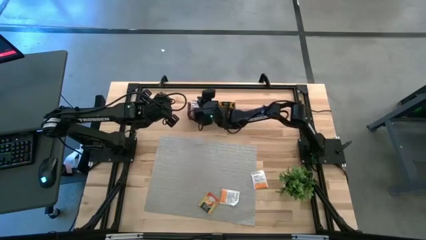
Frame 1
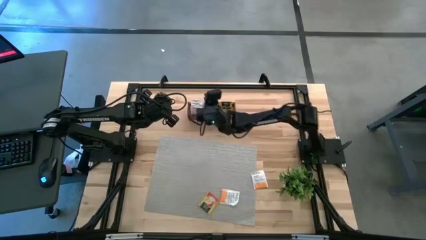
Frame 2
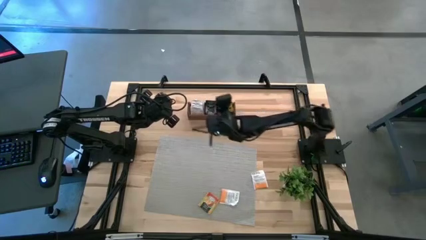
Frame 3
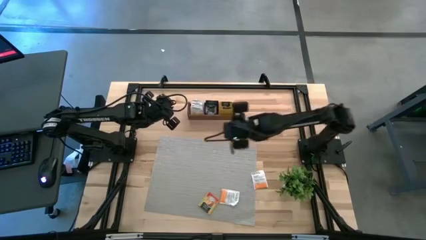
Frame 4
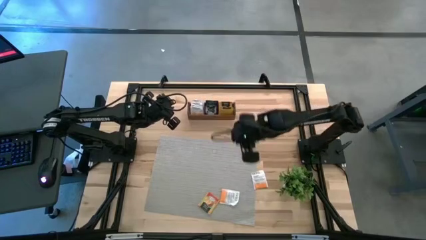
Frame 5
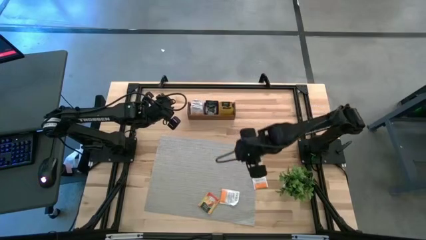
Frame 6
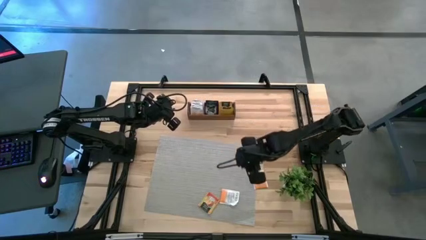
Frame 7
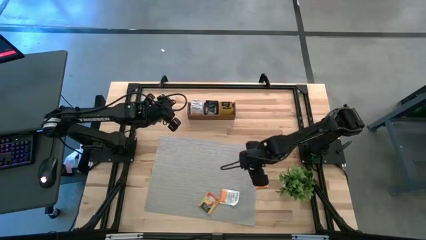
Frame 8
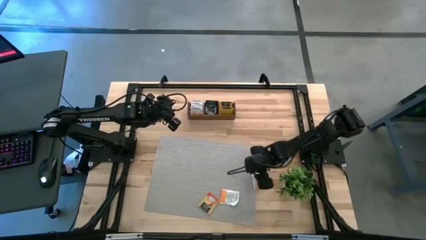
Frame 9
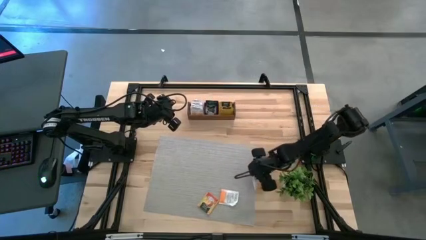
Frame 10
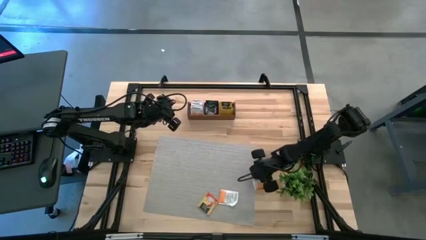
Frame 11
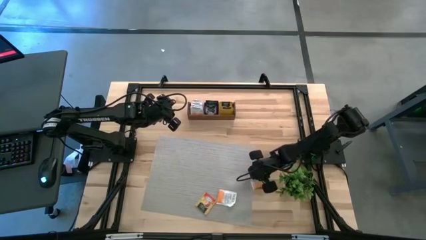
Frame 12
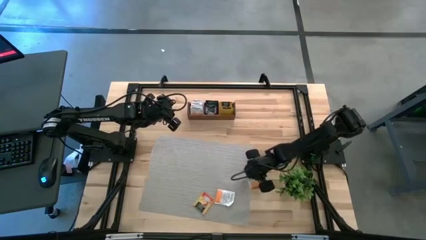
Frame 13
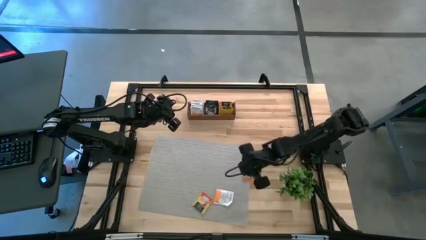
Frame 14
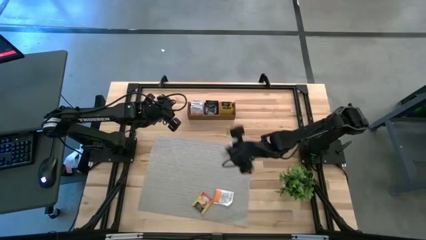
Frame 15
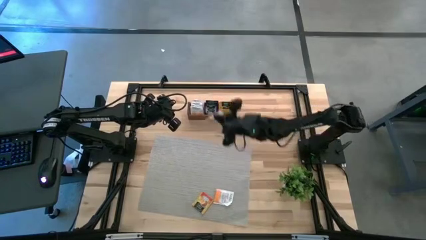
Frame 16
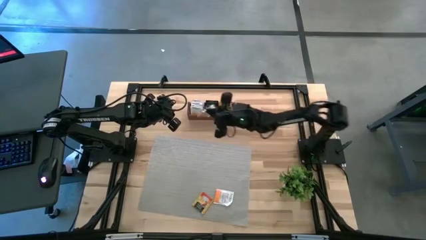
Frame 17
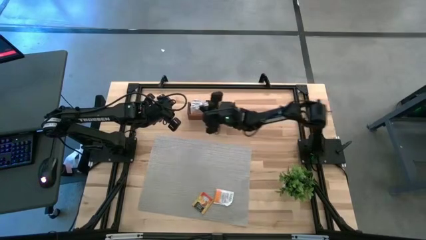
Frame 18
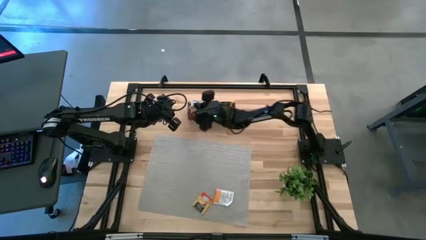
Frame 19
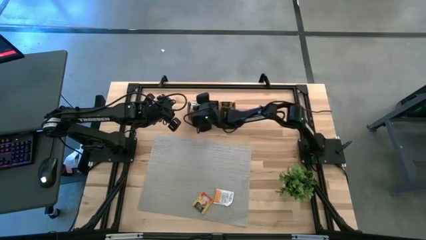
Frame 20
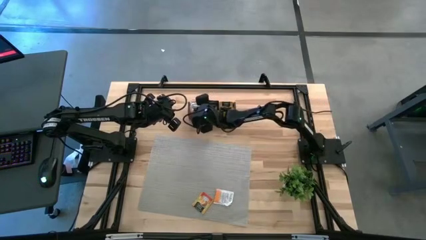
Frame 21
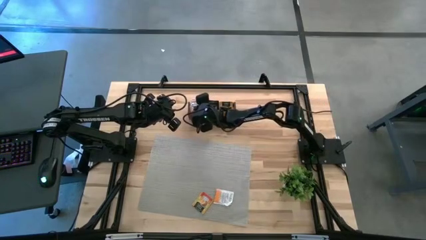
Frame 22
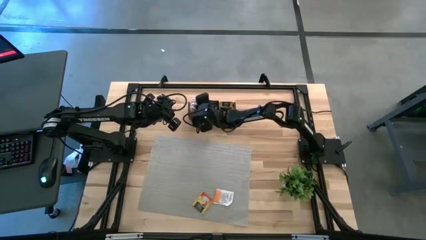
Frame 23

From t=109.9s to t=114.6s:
Task: Pick & Place Tea
Put the orange tea bag into the left section of the wooden organizer

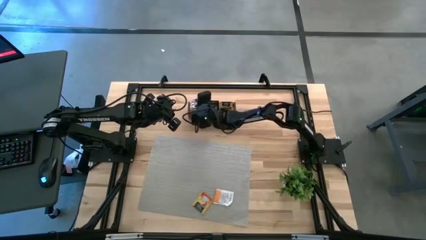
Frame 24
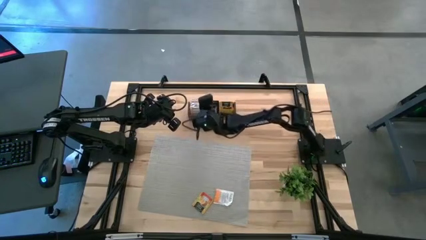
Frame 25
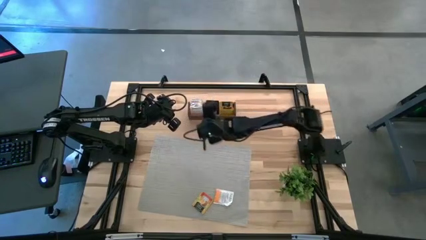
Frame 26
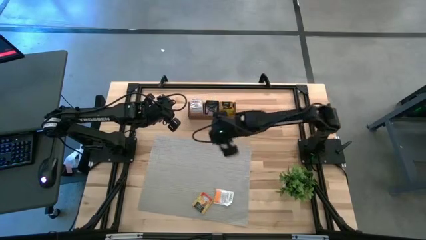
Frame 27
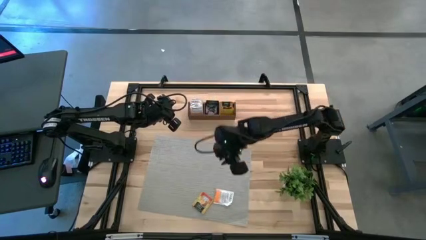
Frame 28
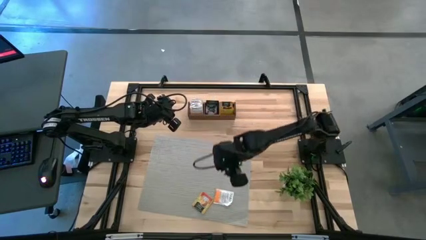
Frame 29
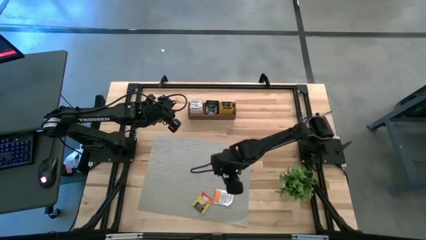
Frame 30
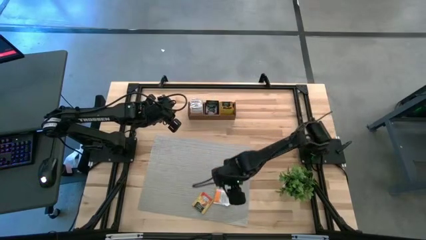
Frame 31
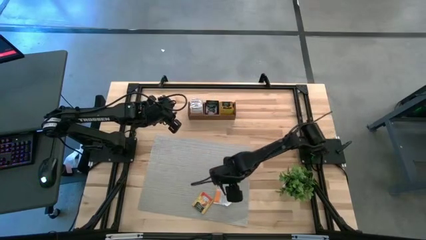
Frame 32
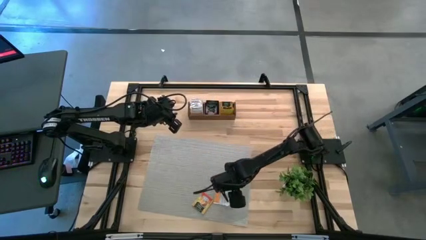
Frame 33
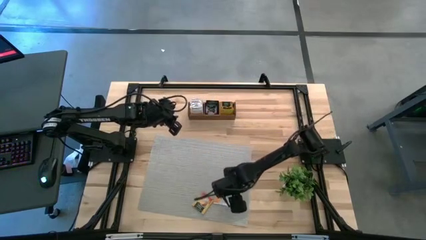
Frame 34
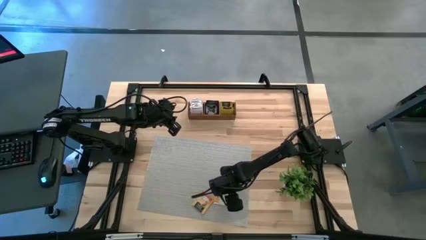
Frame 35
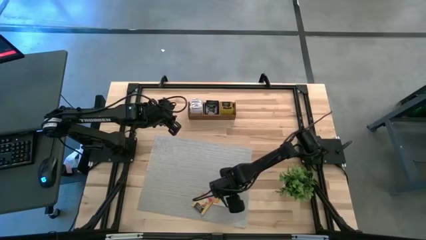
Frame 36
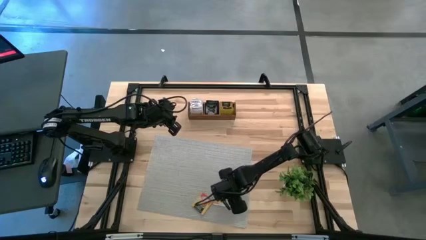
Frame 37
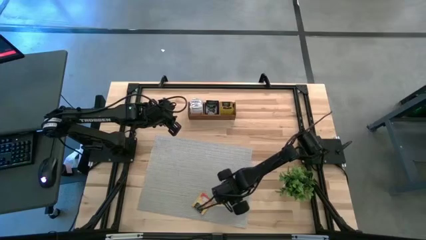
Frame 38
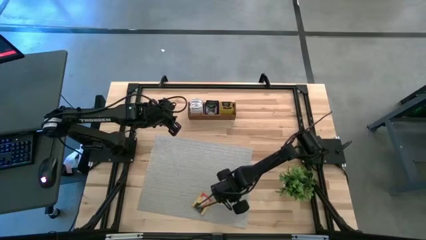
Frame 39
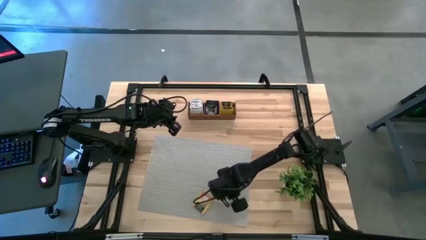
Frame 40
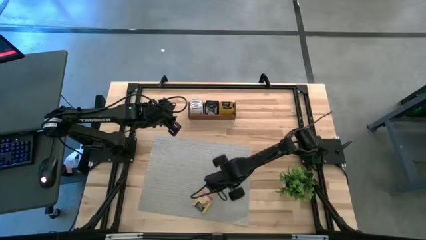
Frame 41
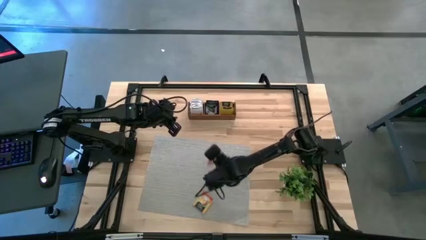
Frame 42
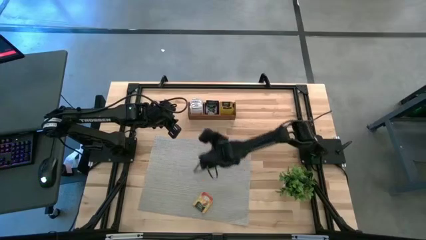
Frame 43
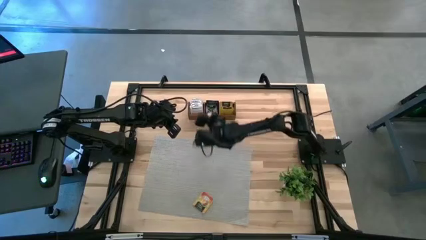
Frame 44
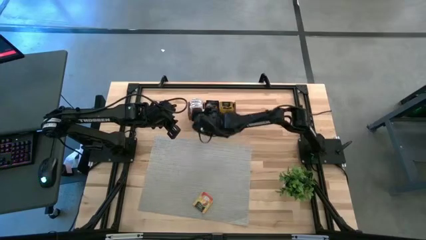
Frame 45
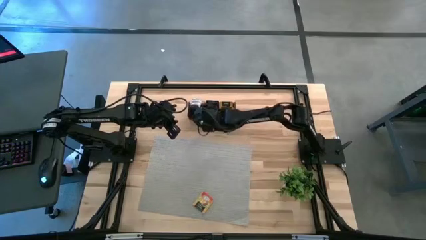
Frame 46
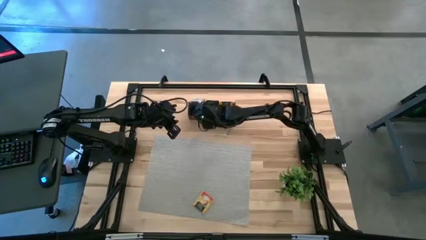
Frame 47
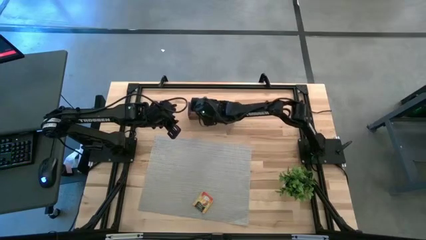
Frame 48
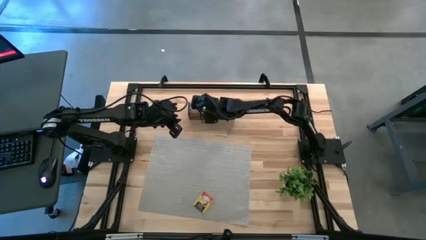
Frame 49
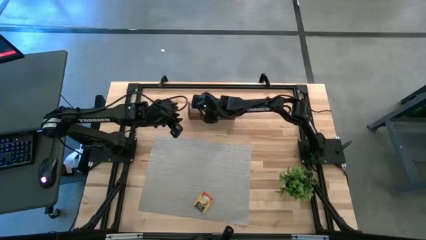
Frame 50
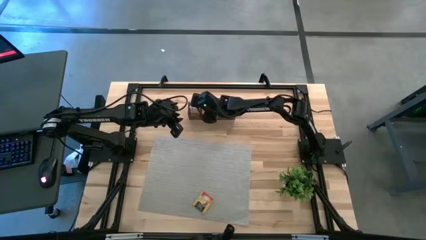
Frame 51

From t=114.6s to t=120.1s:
Put the orange tea bag into the left section of the wooden organizer

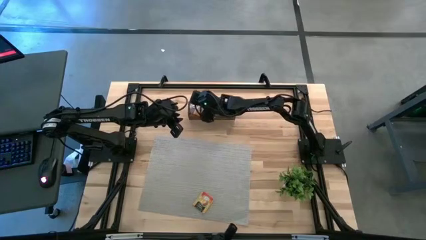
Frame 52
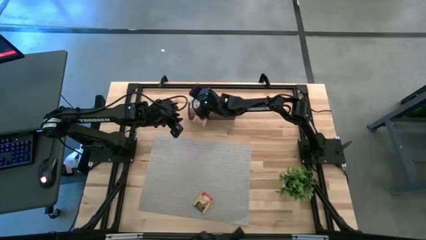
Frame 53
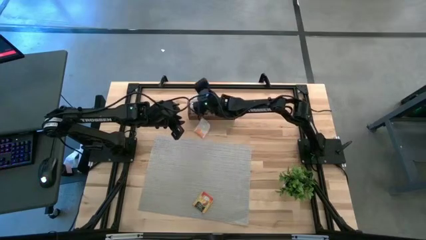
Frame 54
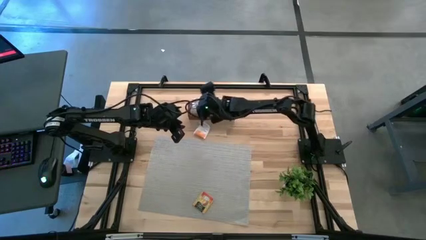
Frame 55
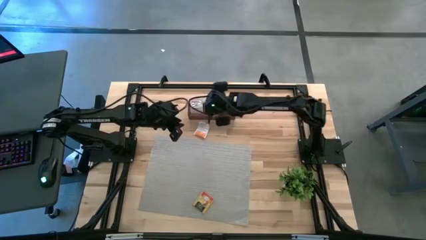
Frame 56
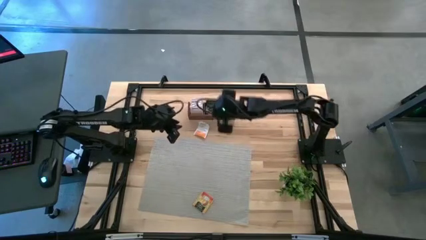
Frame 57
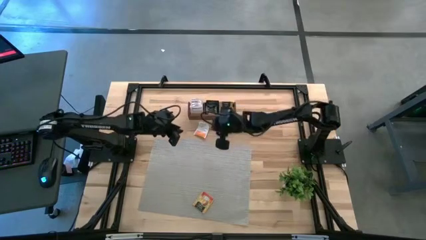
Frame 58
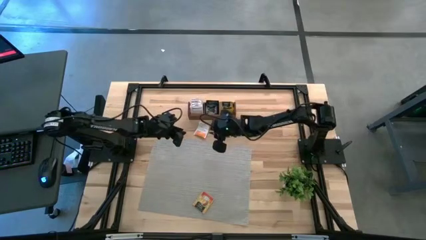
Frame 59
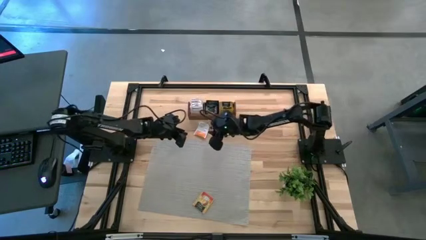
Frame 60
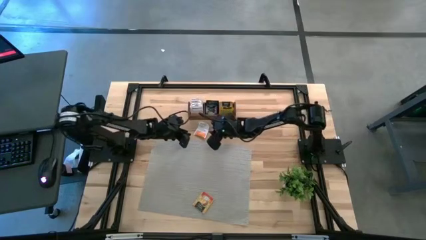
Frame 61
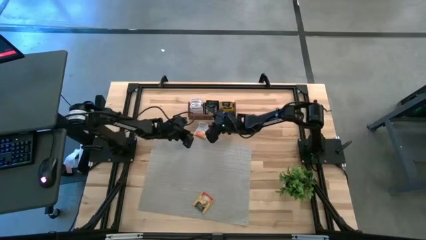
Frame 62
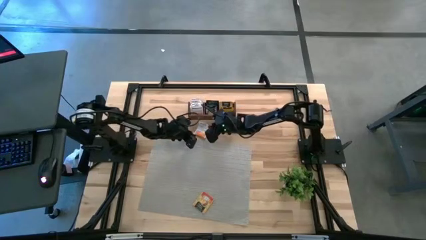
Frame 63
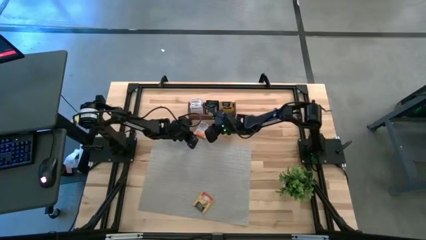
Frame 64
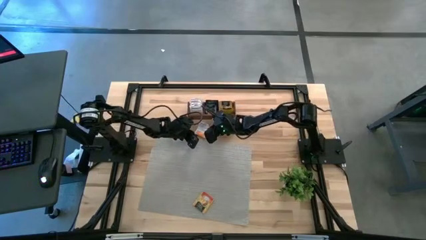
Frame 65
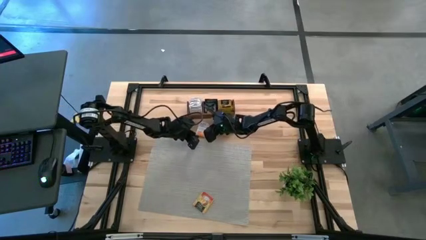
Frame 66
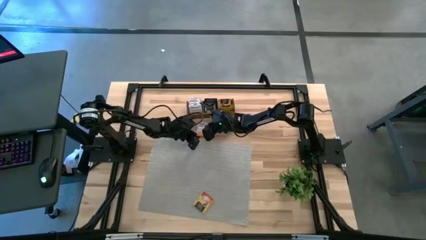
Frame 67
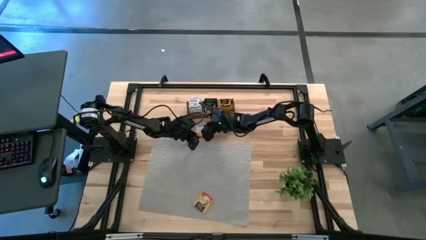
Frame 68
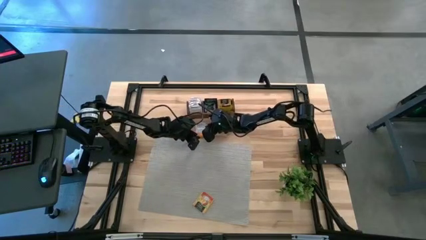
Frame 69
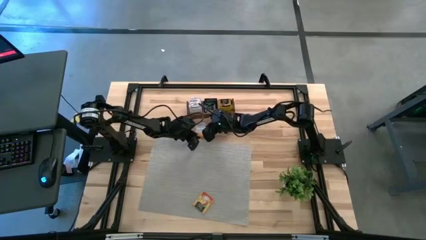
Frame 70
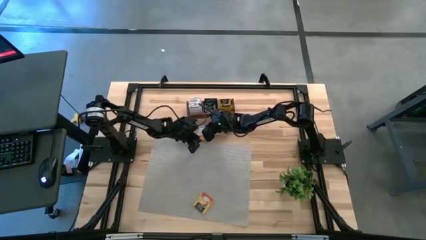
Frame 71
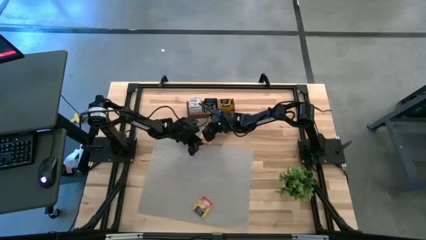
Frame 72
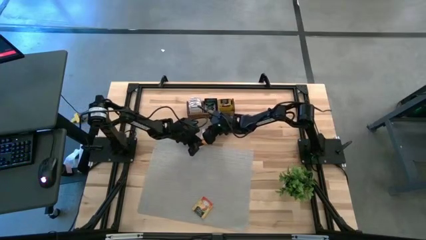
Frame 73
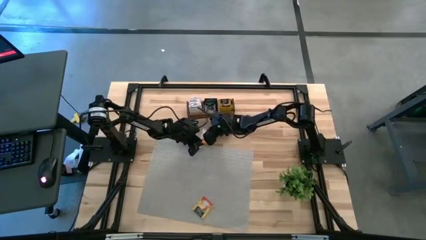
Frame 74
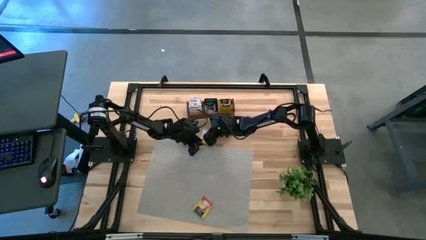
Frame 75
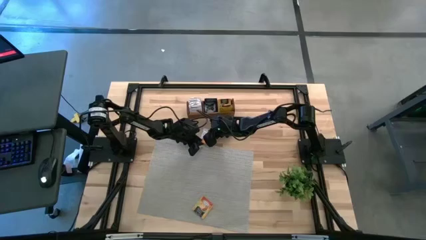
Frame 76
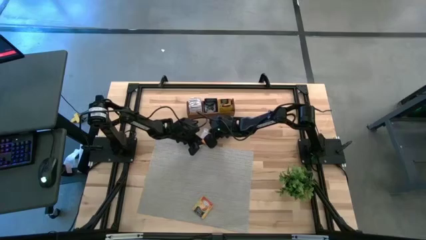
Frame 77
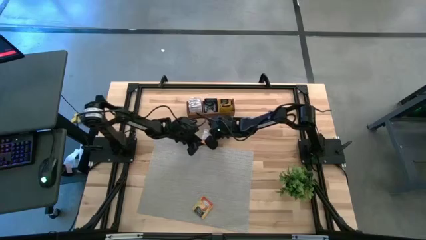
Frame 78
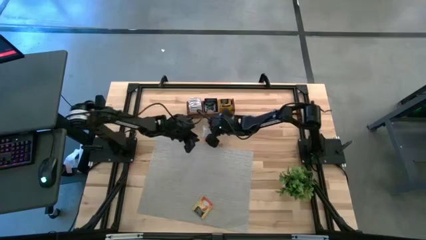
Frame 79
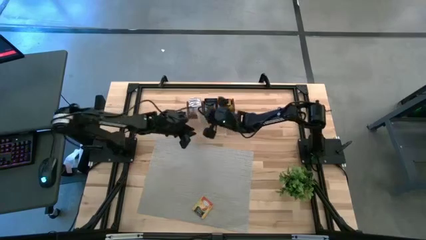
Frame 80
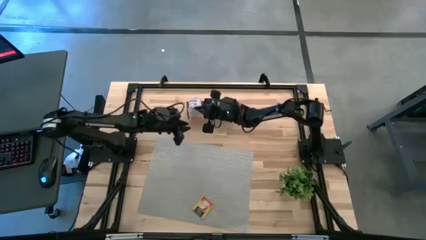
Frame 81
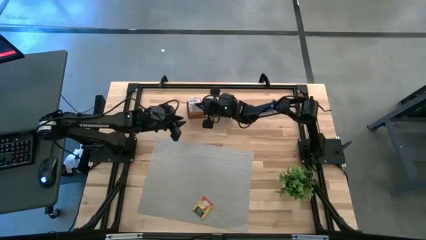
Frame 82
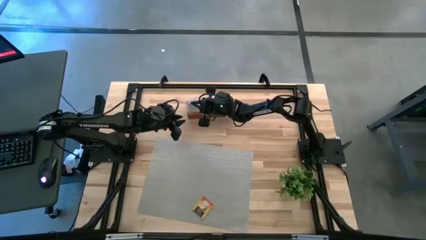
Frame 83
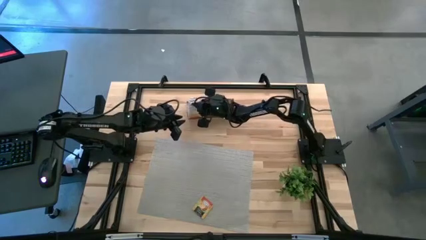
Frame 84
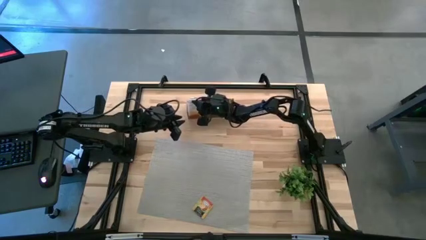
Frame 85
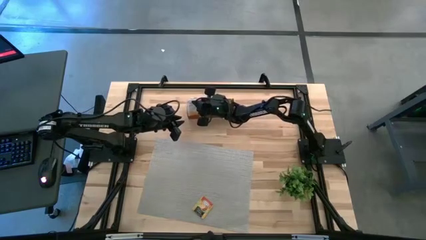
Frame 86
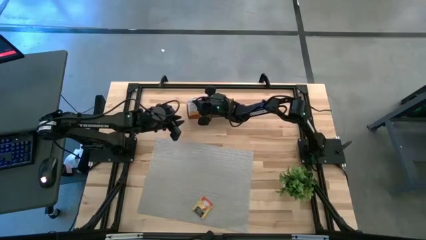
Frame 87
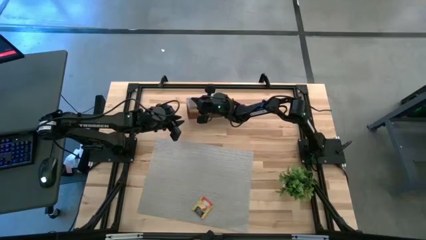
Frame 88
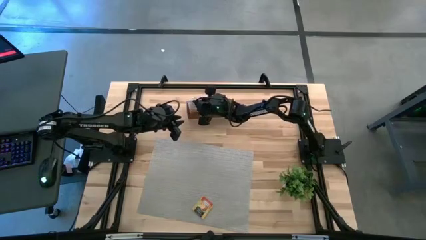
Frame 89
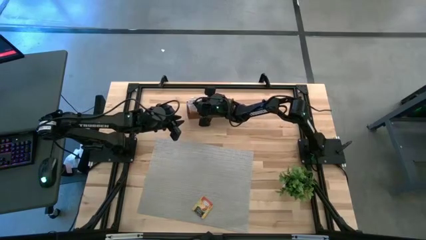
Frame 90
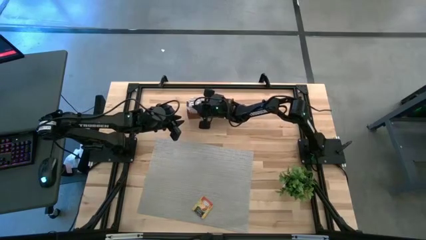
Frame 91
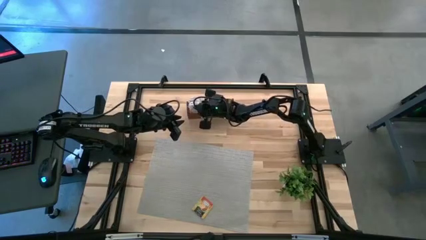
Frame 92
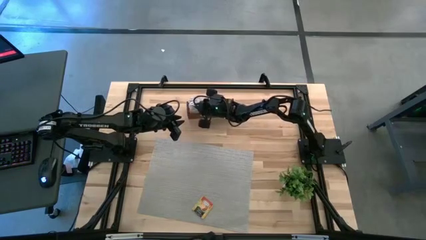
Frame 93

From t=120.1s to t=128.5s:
Put the orange tea bag into the left section of the wooden organizer
